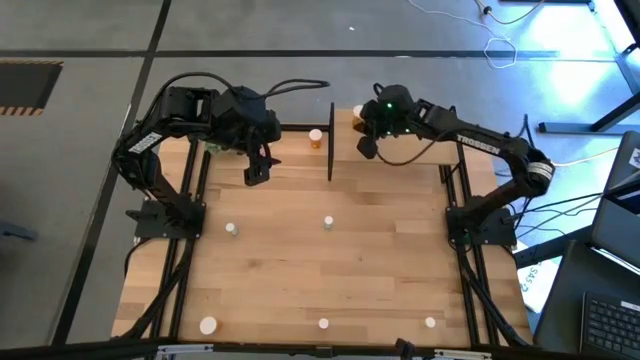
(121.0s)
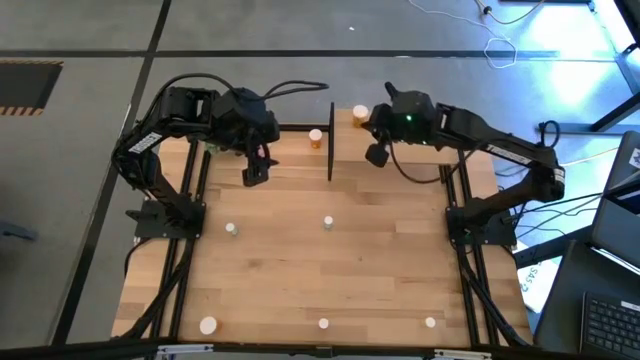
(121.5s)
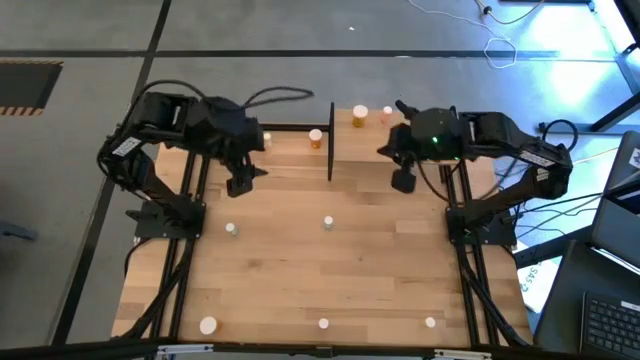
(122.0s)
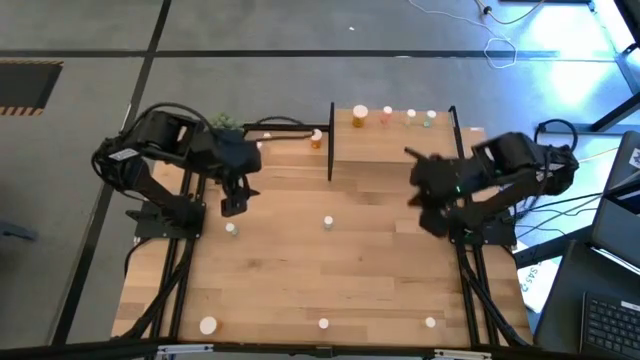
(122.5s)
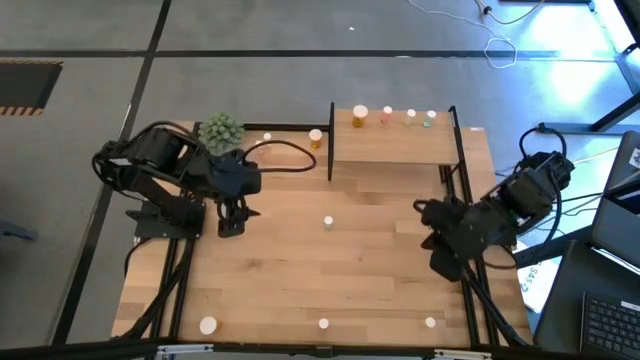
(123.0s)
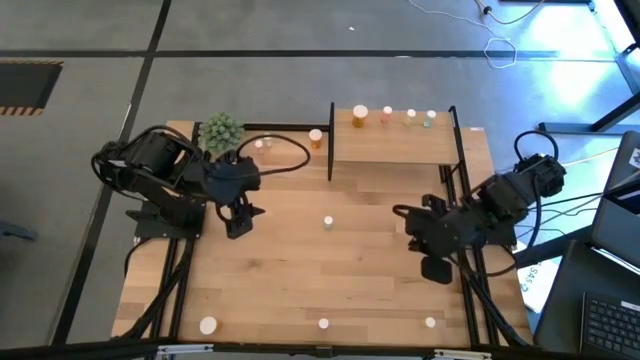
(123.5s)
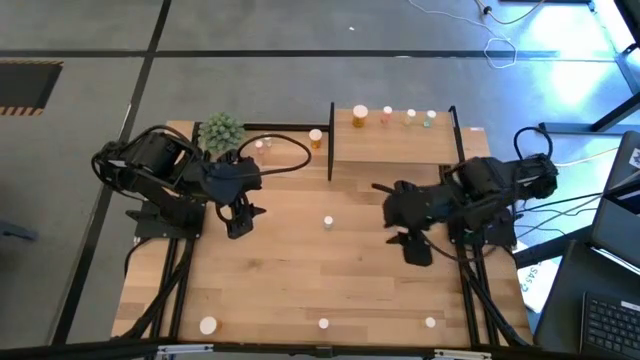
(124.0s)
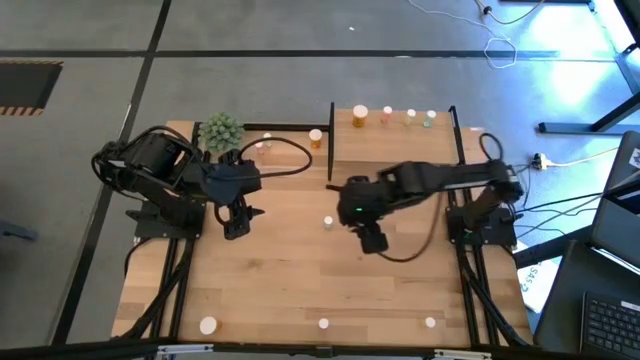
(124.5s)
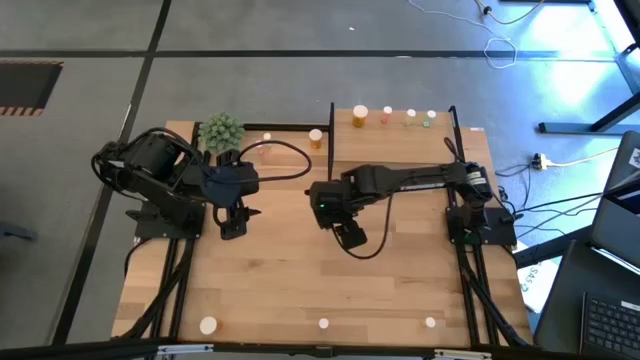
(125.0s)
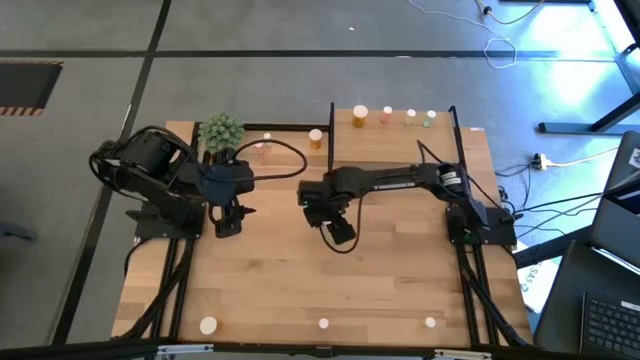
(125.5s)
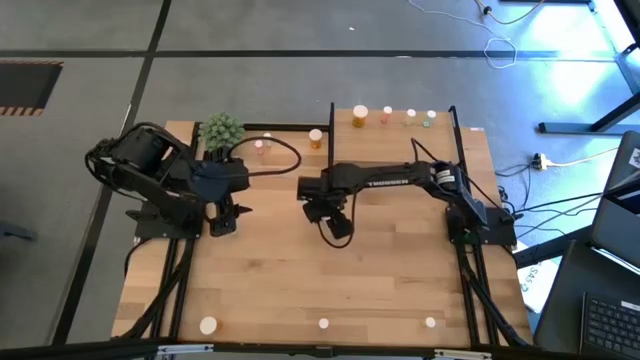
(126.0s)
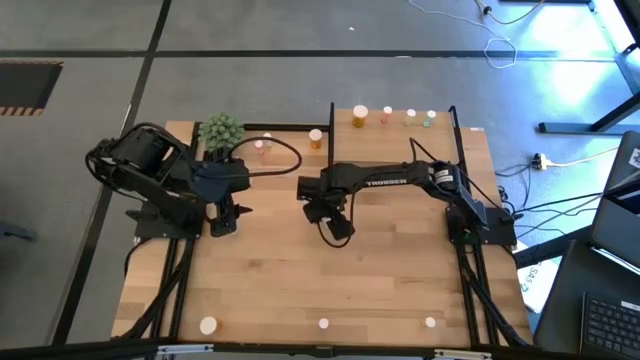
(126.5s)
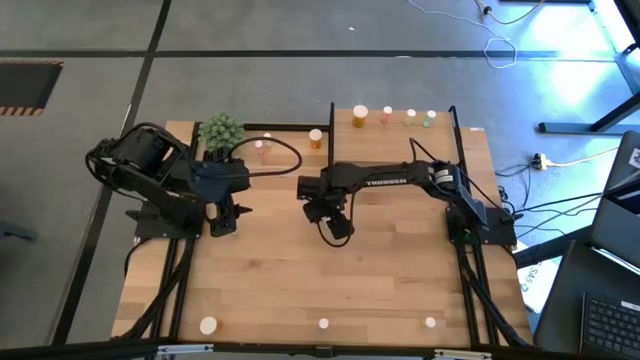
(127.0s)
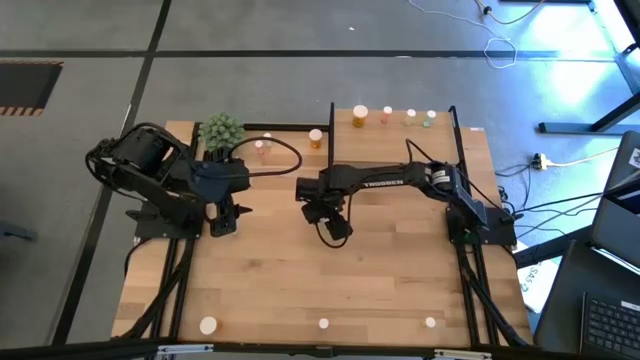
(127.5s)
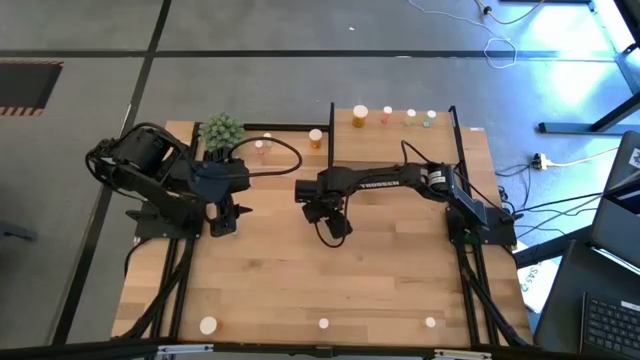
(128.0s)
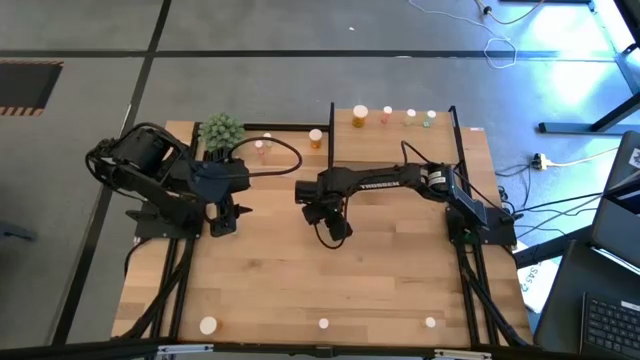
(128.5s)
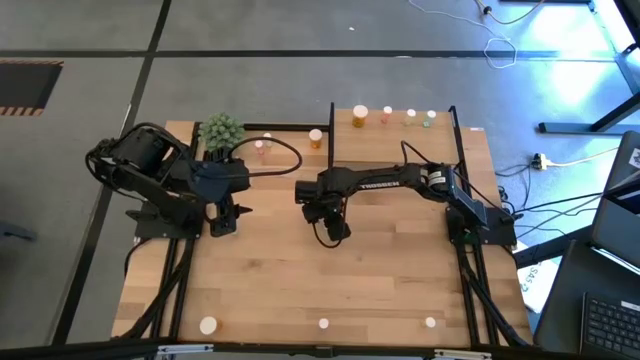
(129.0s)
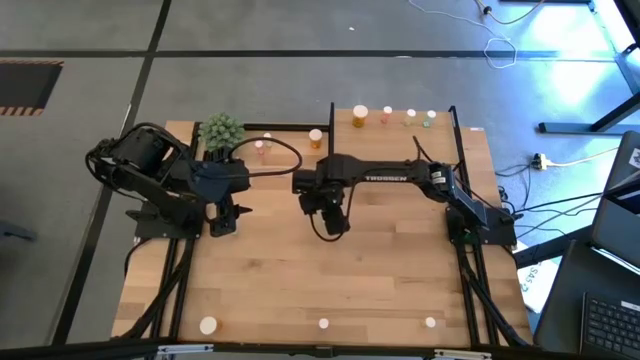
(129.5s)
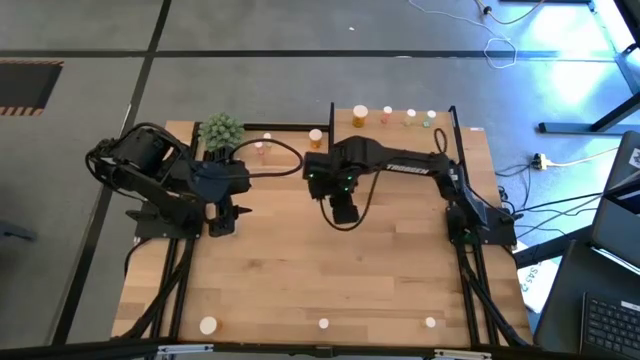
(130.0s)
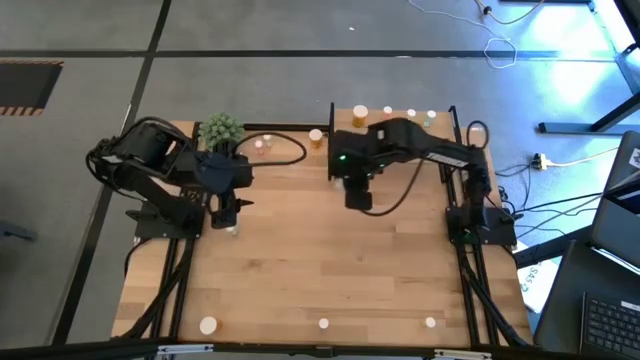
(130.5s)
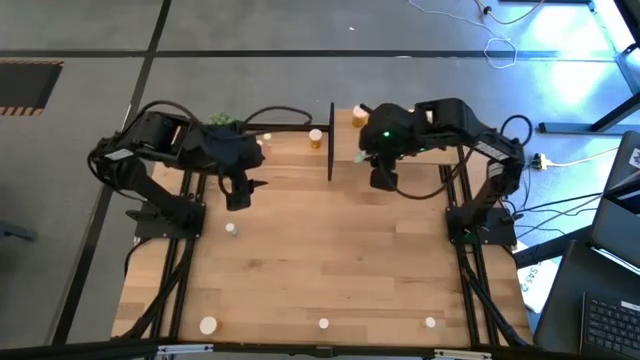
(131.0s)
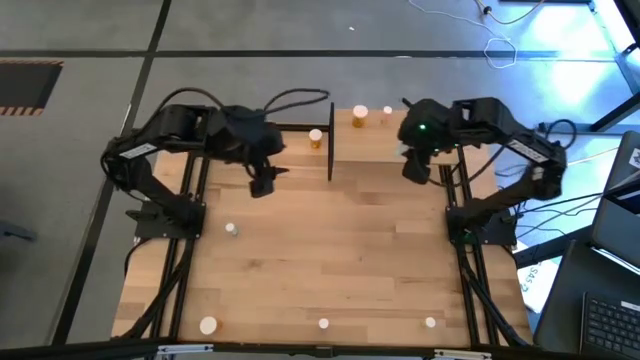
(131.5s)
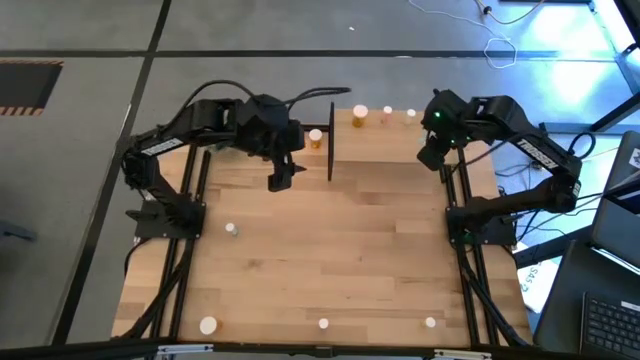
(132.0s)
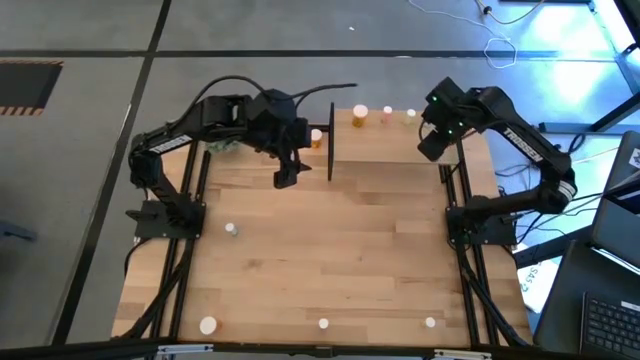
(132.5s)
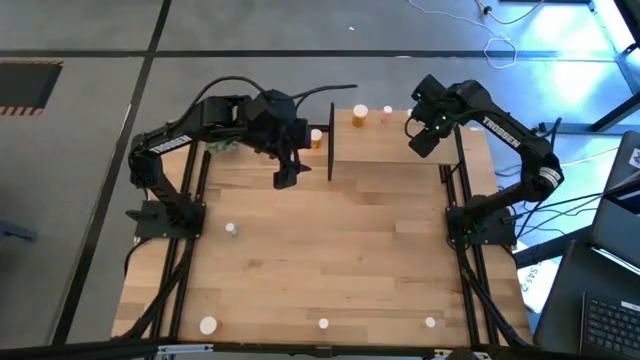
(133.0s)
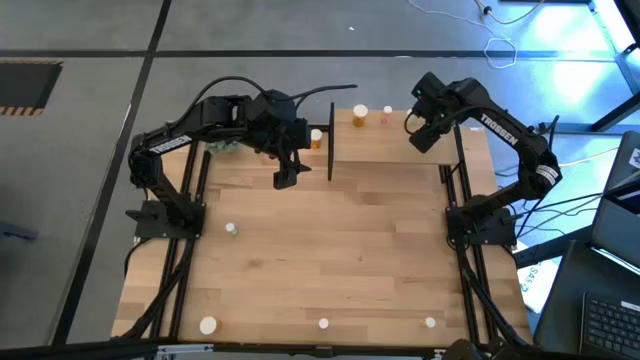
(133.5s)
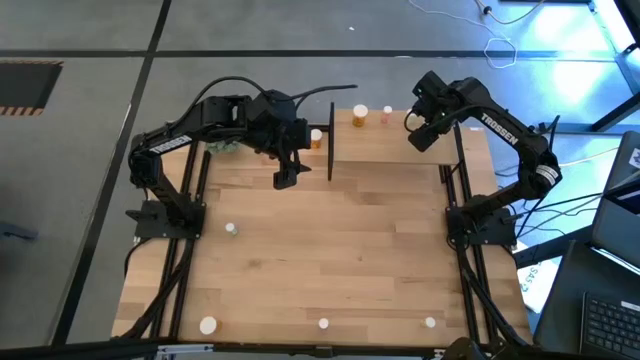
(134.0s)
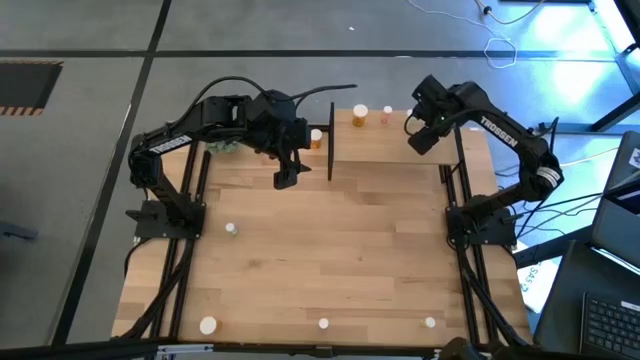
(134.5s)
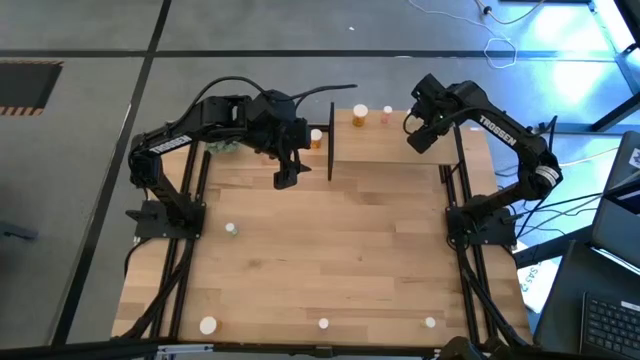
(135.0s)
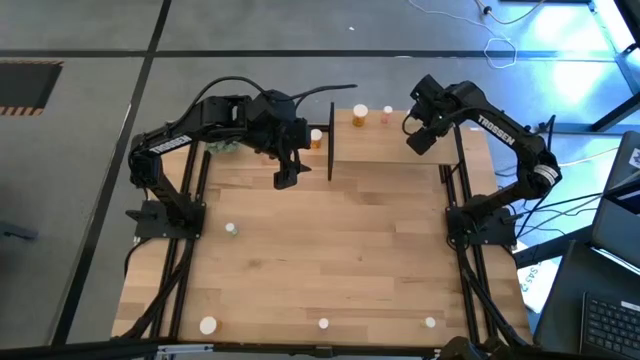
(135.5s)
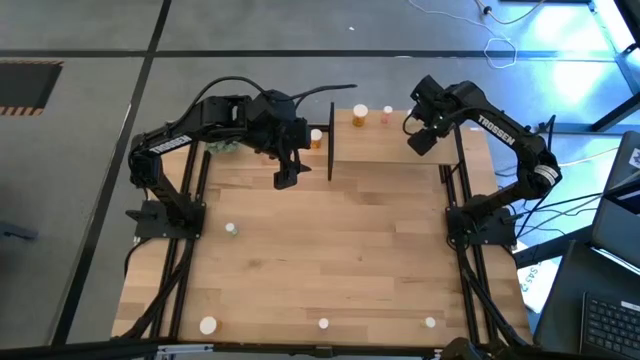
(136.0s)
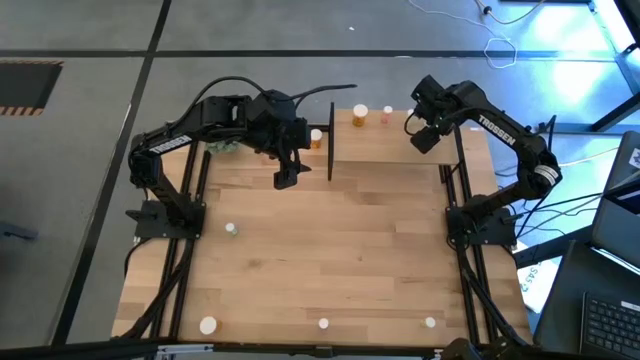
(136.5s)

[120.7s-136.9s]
Task: Pick and place medicine bottles onto shelf by color
Put the right blue pill bottle on the shelf aligned with the blue pill bottle

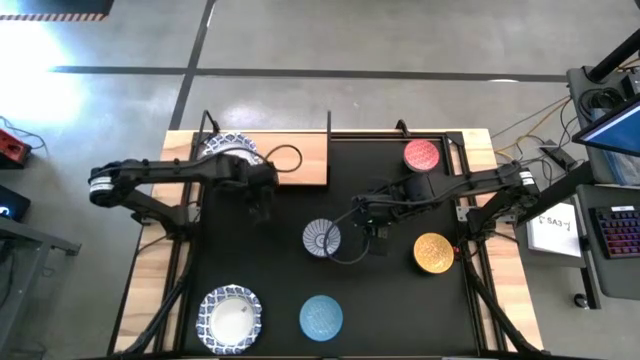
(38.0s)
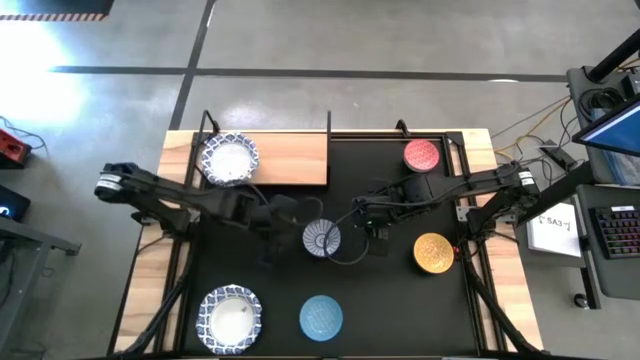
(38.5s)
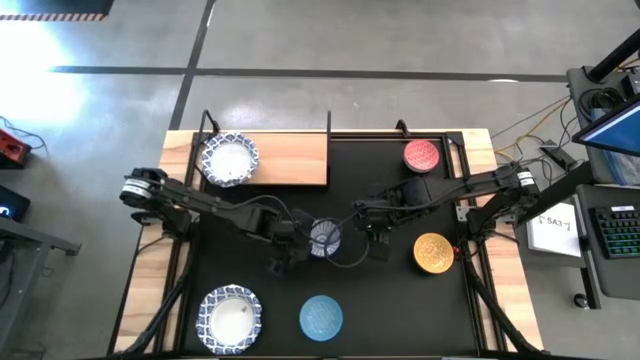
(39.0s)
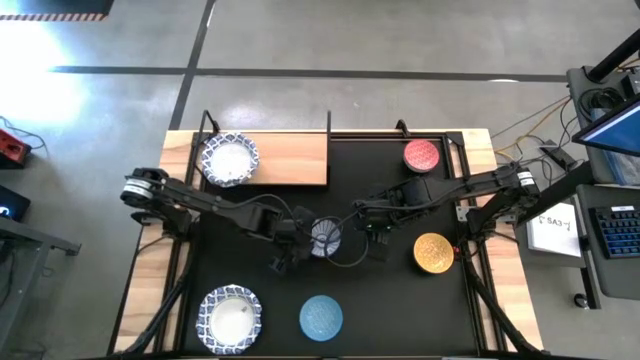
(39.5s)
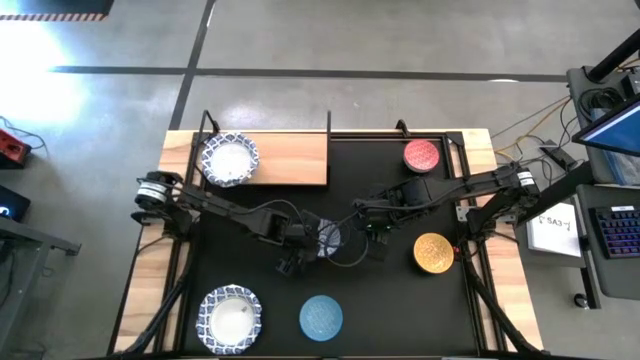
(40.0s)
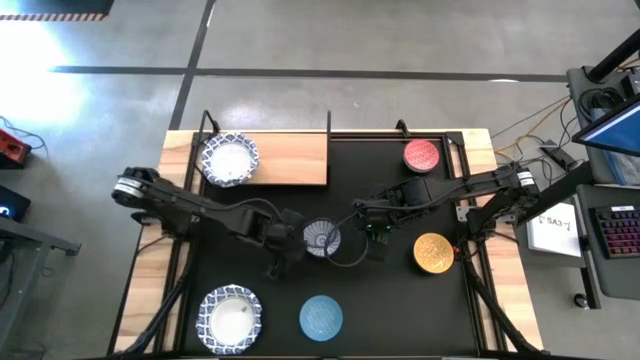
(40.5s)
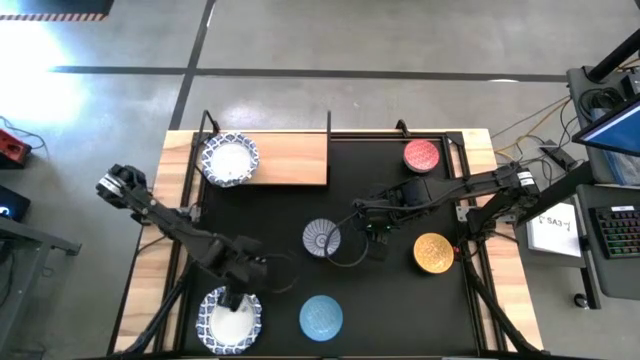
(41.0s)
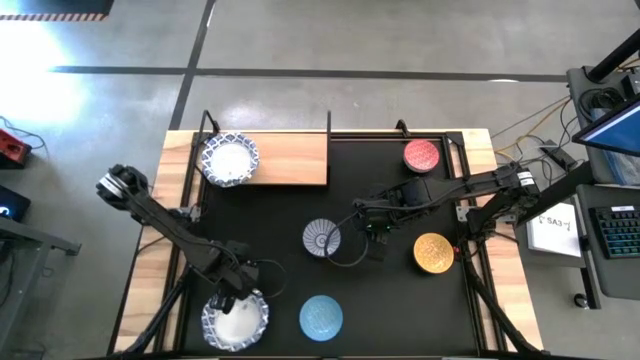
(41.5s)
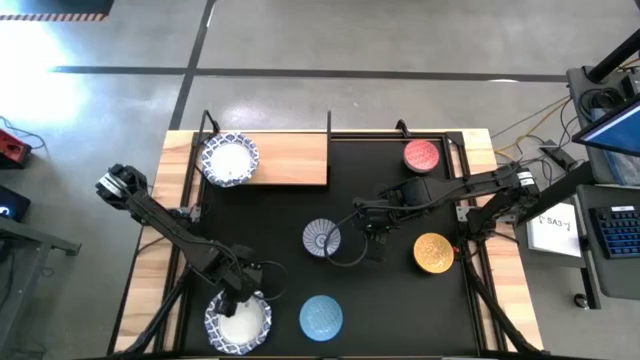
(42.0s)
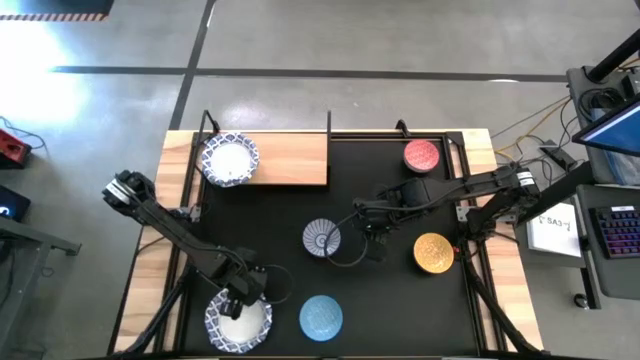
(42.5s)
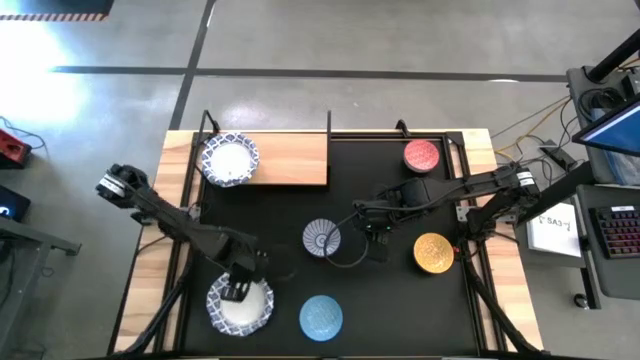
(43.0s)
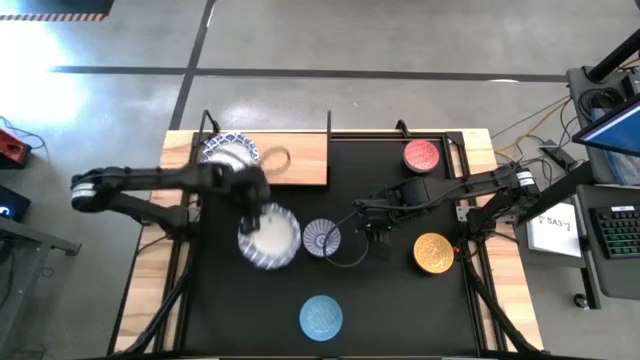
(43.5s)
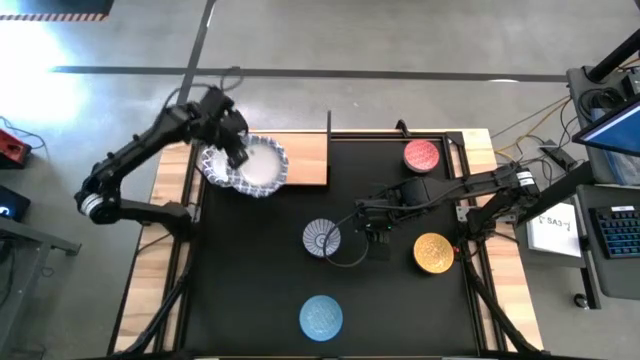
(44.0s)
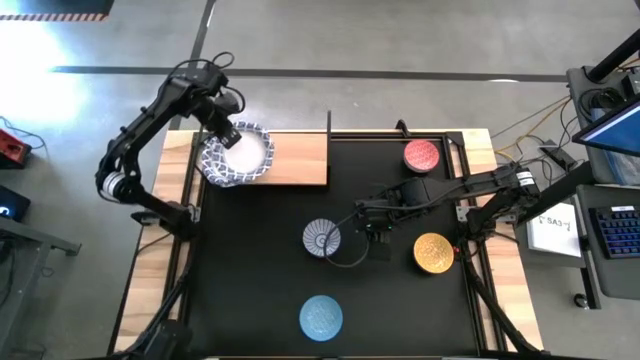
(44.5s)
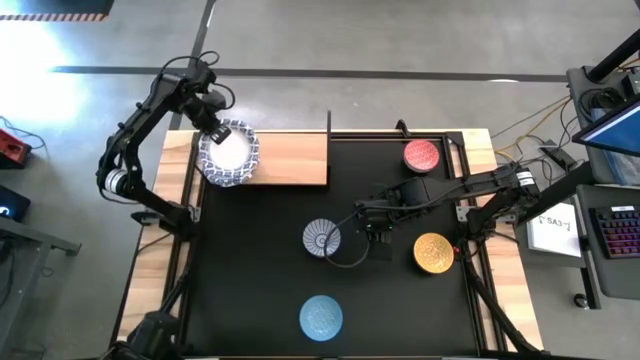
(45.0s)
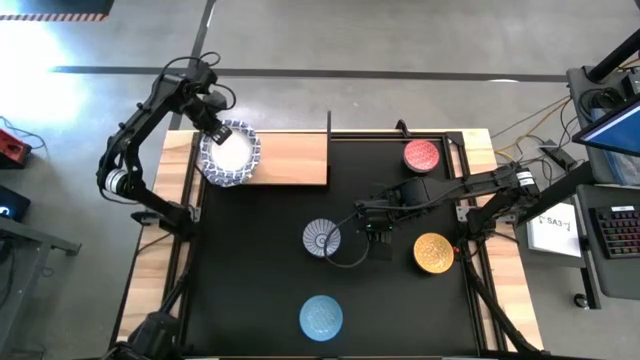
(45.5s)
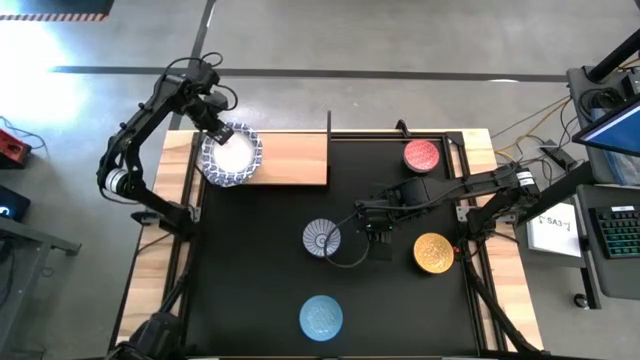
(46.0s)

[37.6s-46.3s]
Task: Place and stack bowls onto a shelf
Stack the white patterned bowl on top of the white patterned bowl on the shelf
